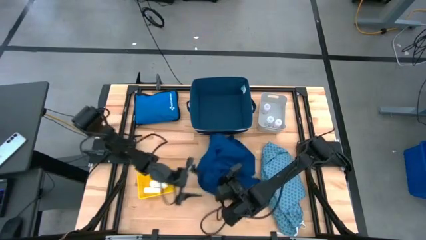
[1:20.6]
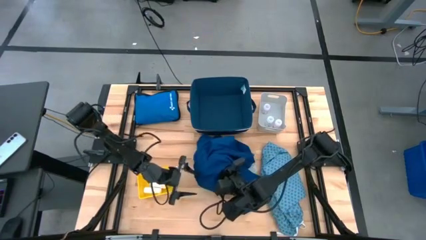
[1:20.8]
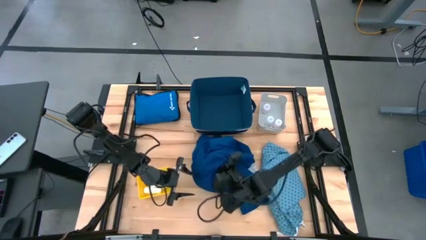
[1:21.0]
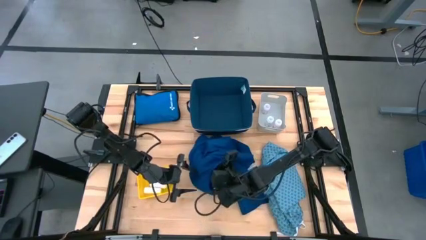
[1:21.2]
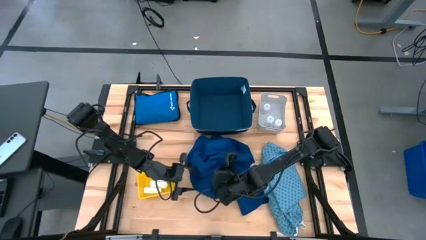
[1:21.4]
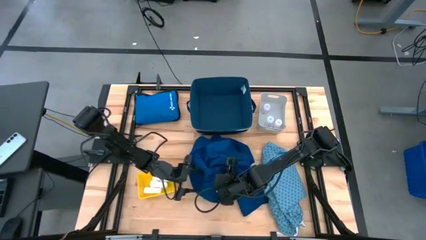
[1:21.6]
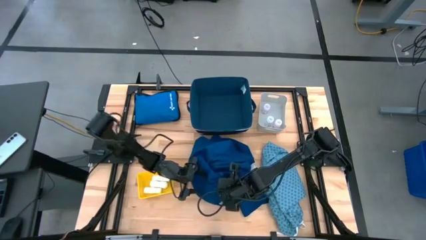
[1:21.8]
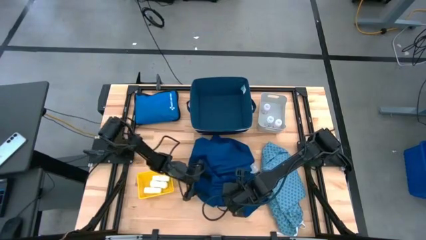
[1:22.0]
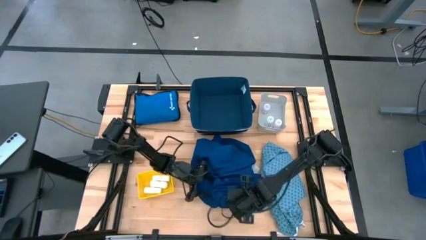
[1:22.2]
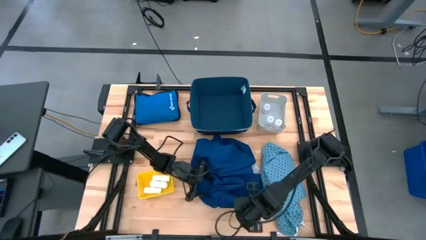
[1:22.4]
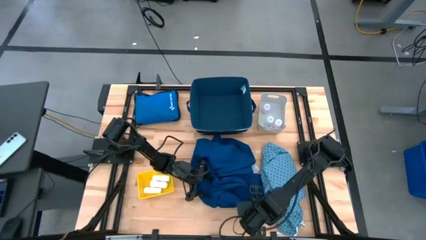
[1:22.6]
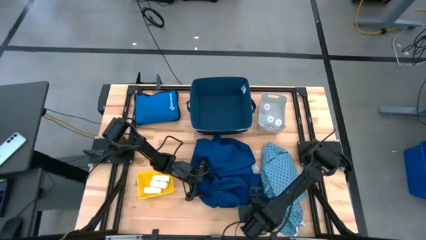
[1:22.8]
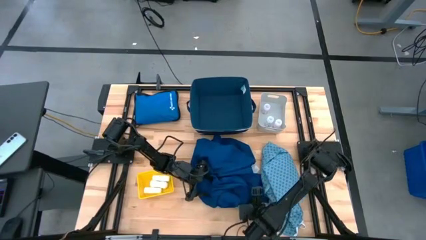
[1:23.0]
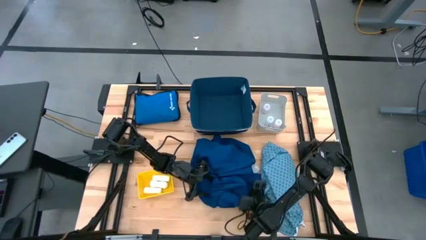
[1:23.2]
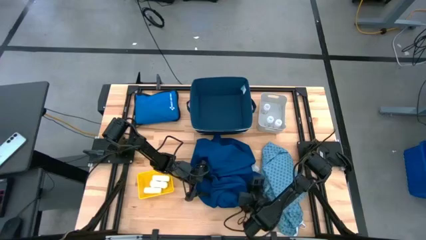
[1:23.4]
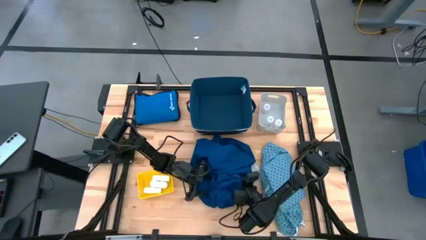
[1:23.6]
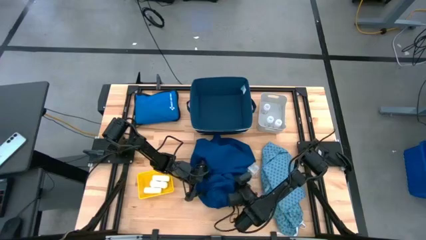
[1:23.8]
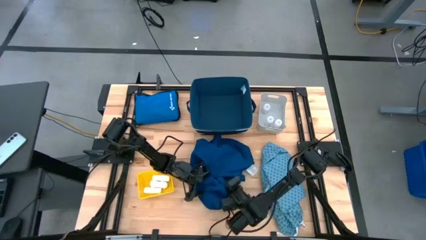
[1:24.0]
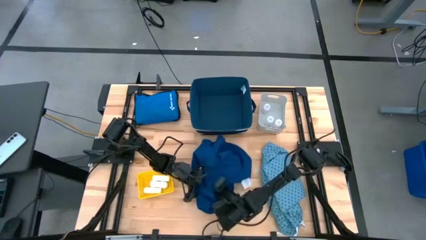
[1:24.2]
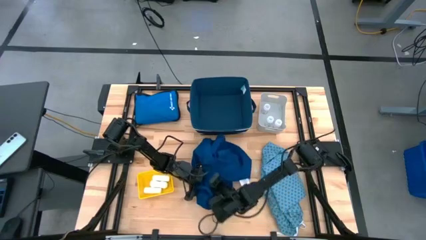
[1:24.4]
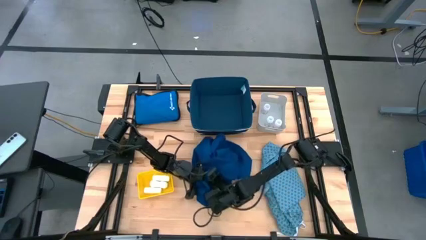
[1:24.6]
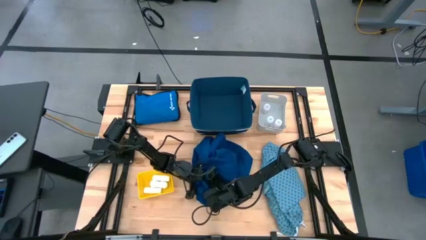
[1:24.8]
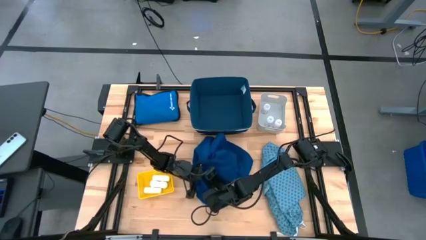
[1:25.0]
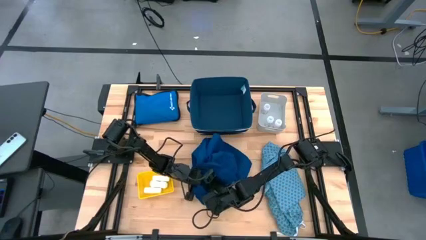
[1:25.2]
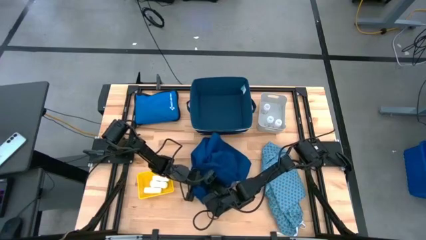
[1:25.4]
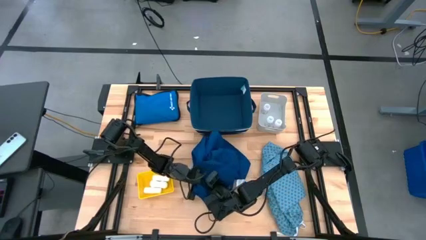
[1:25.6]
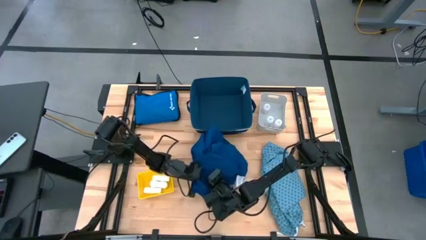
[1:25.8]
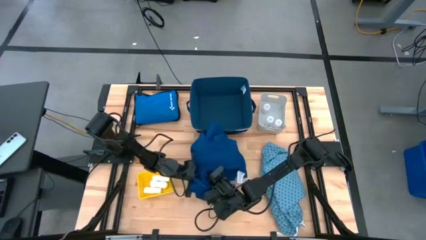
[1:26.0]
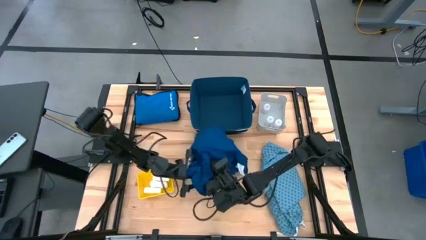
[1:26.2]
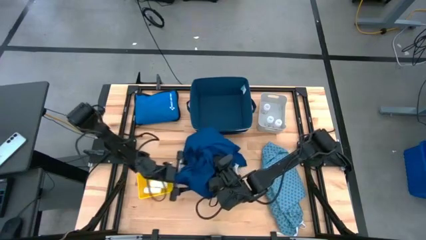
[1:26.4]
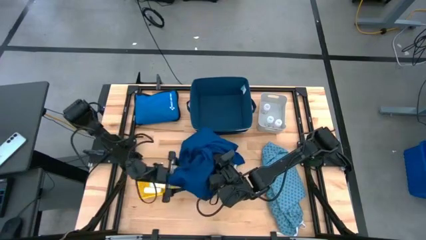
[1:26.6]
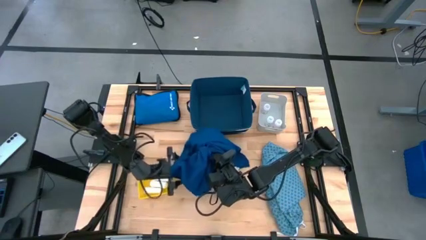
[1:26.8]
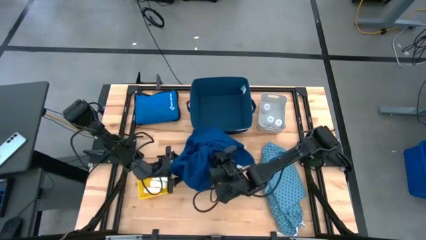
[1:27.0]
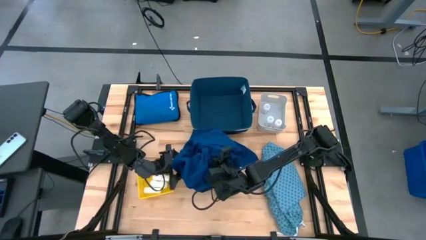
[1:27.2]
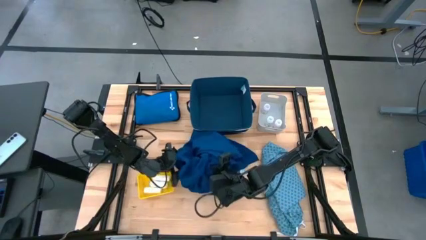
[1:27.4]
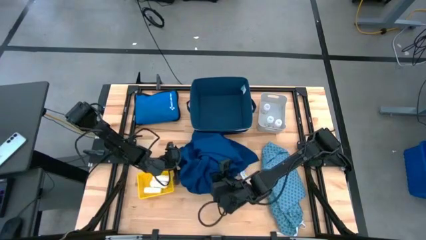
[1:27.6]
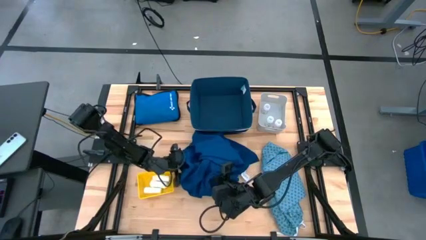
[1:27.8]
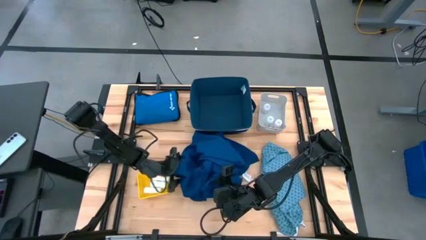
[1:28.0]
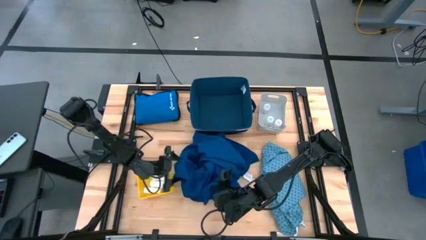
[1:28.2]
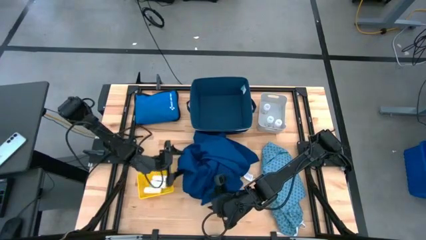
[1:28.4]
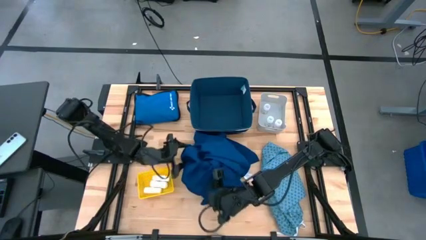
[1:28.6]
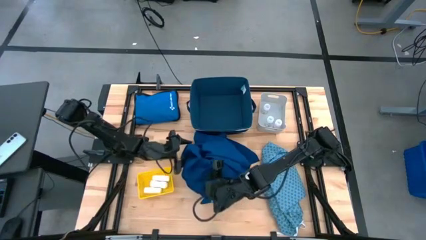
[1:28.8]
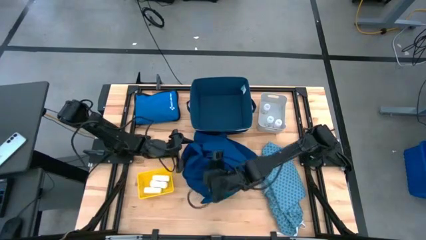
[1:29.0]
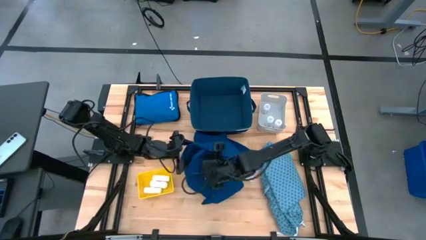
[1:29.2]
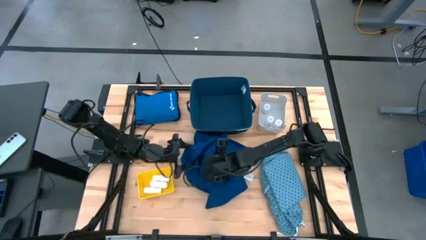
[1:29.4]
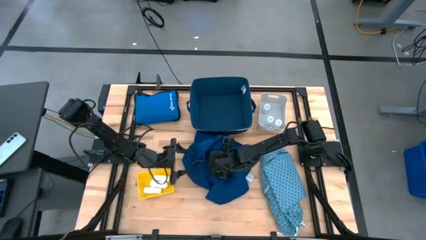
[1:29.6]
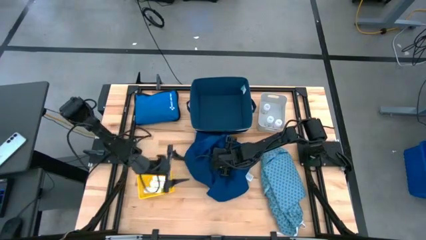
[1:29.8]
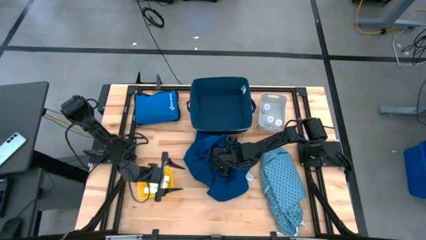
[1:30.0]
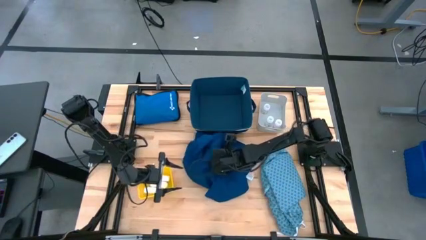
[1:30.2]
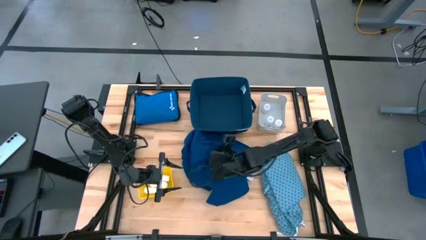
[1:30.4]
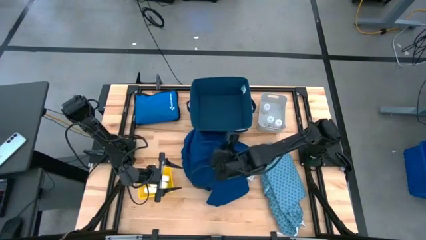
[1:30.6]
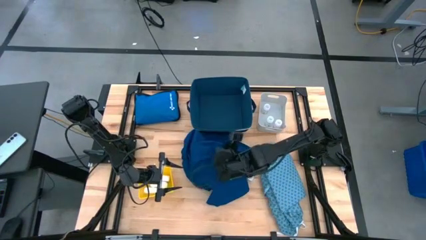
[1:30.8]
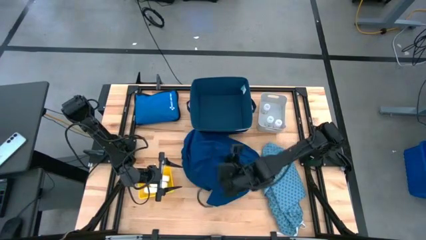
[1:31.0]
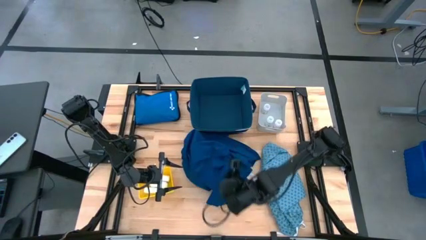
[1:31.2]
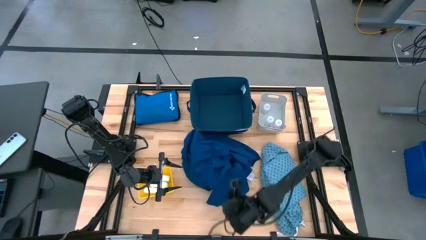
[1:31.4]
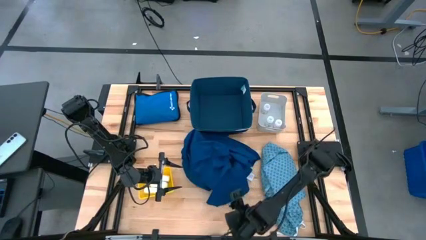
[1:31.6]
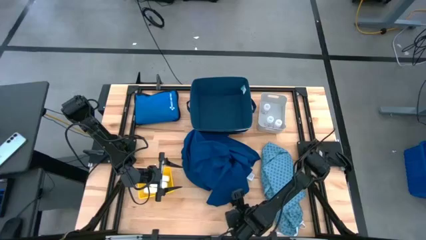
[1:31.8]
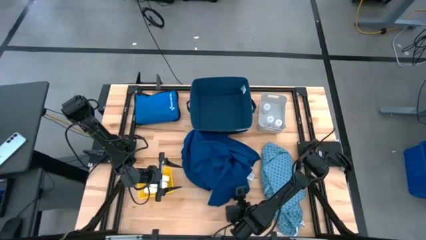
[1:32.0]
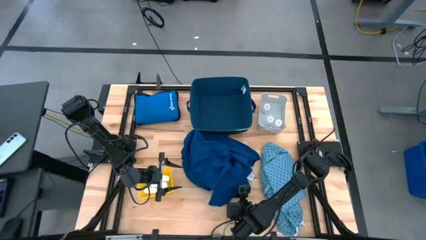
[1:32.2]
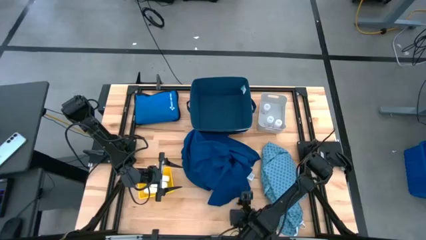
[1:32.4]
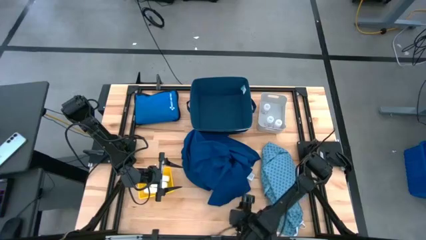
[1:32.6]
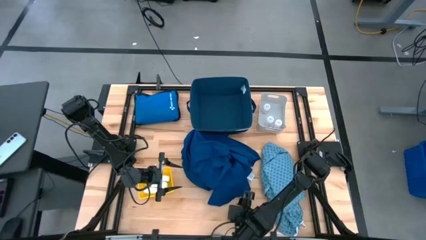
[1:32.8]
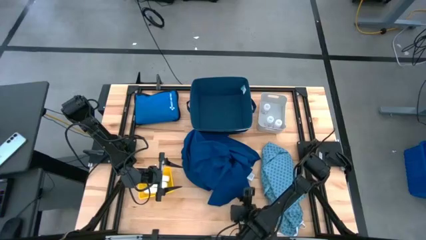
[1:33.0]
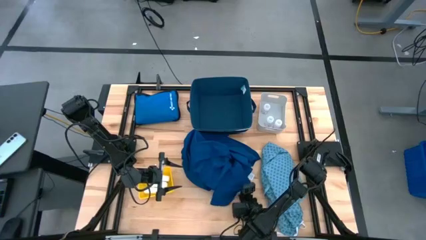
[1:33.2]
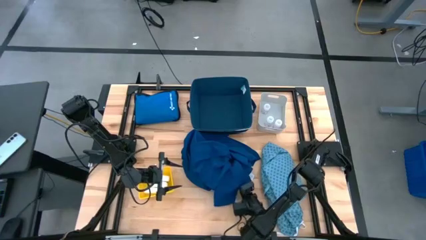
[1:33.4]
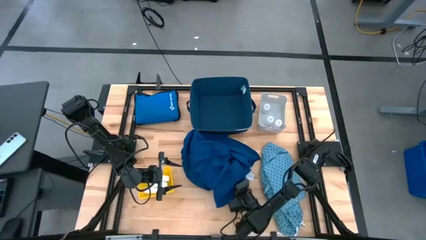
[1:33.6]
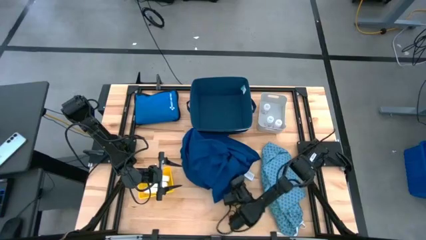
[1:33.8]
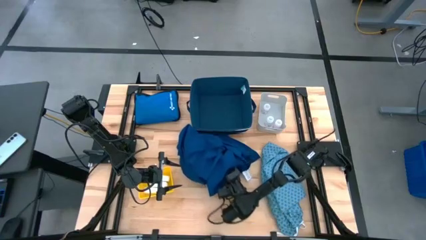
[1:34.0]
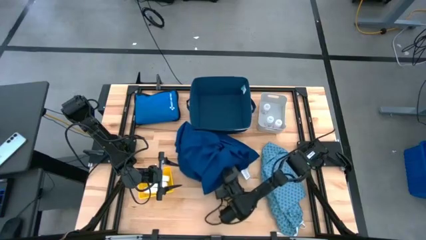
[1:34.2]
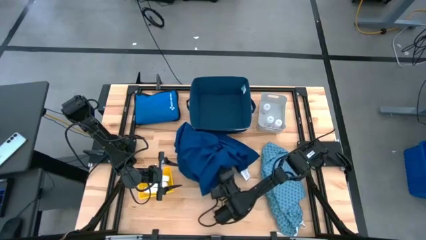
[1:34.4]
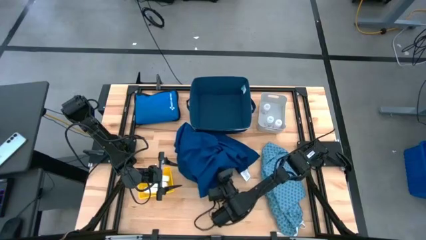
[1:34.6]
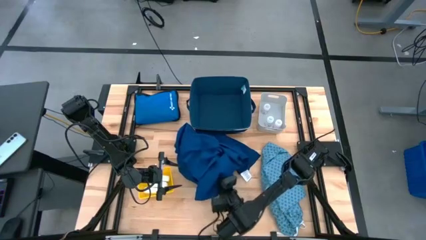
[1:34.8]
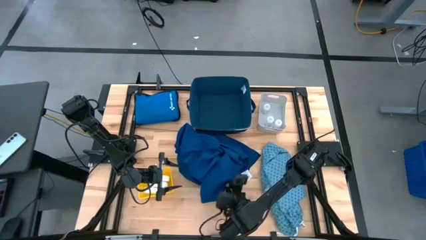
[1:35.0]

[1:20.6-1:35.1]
Task: Pick & Place Medicine items
Adjust the blue patient gown

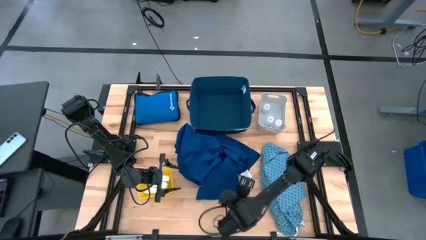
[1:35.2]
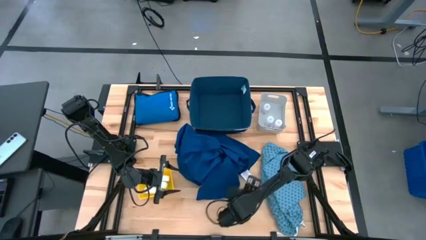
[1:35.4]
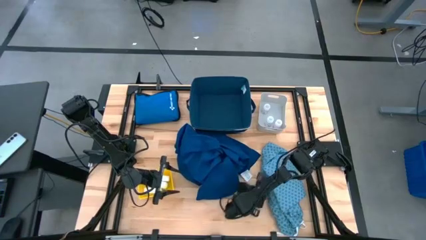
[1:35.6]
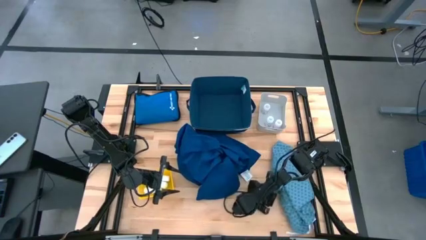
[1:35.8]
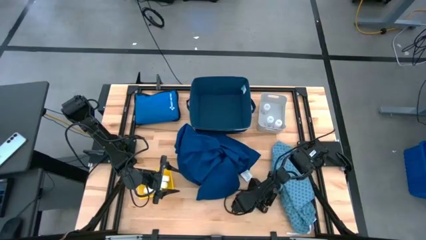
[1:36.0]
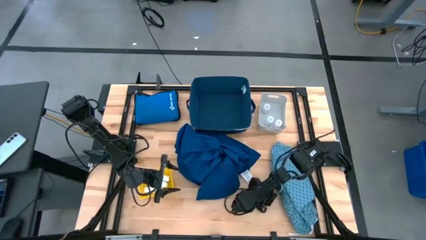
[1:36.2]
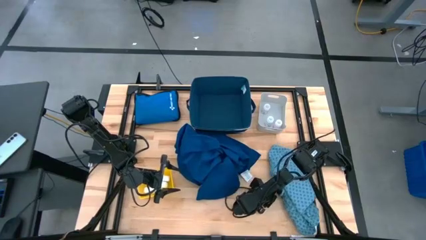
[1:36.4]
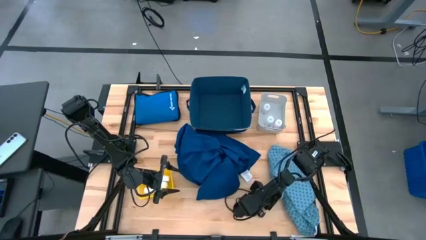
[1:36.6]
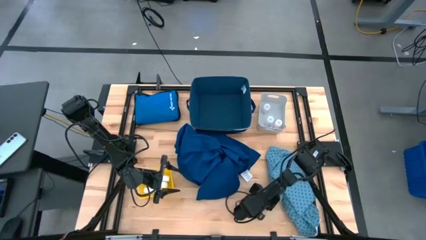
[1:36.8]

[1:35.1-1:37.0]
Put the patterned light blue patient gown into the blue bin
